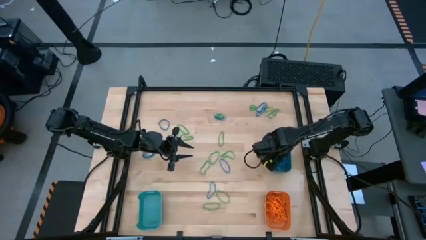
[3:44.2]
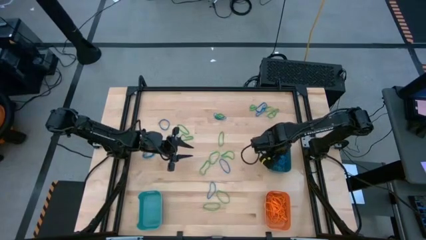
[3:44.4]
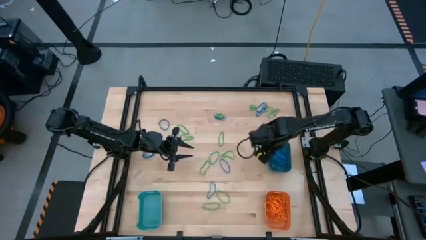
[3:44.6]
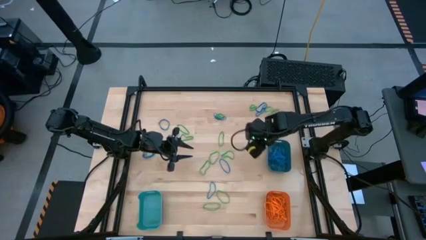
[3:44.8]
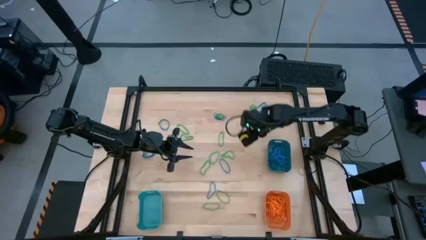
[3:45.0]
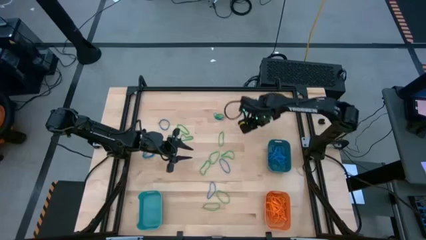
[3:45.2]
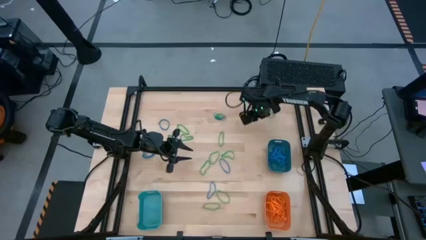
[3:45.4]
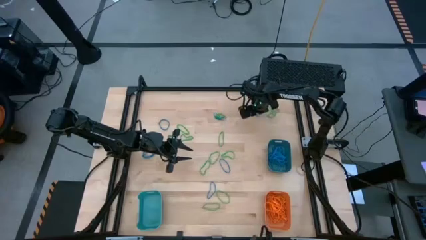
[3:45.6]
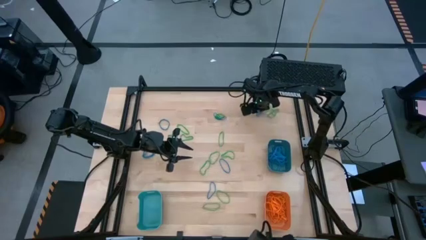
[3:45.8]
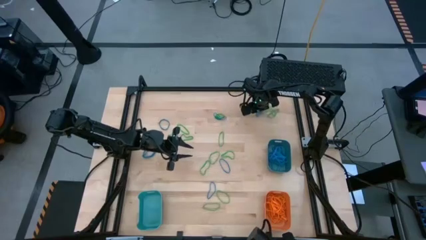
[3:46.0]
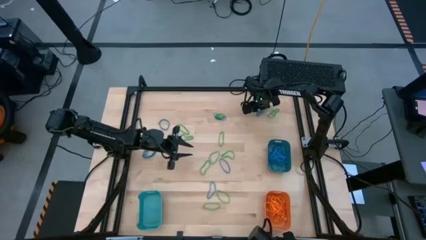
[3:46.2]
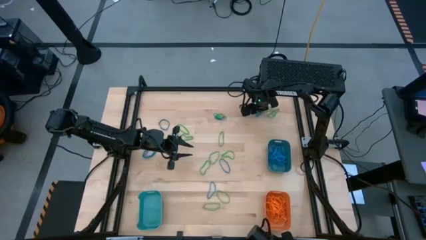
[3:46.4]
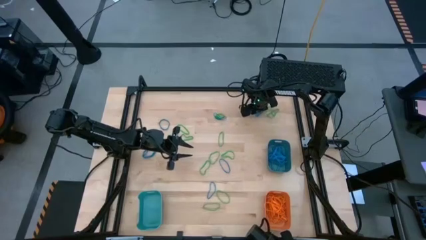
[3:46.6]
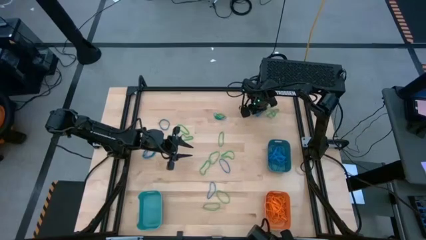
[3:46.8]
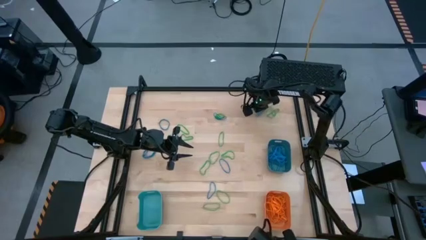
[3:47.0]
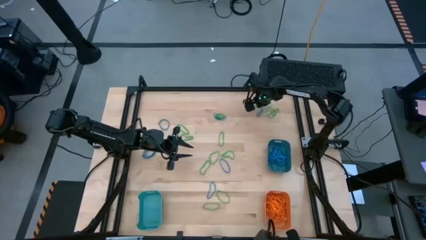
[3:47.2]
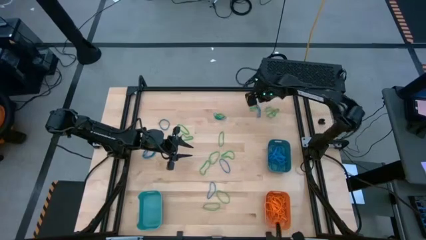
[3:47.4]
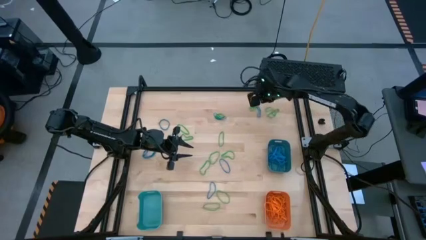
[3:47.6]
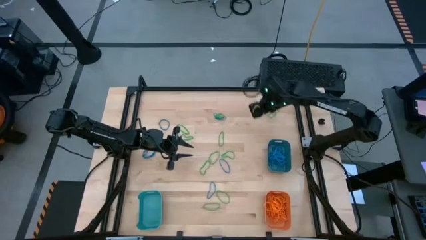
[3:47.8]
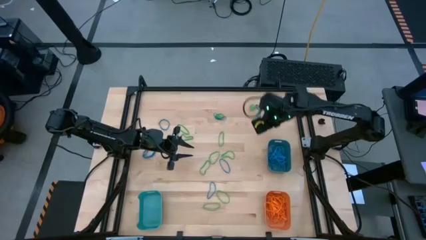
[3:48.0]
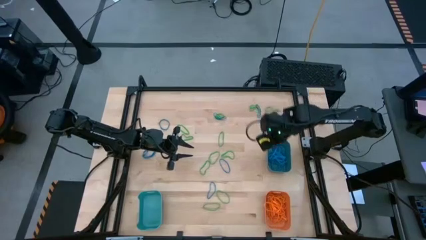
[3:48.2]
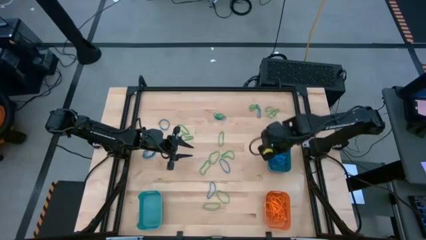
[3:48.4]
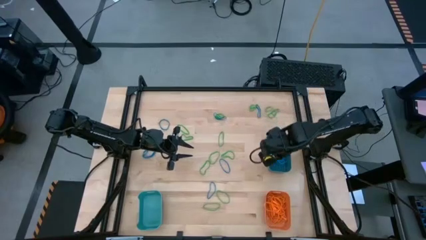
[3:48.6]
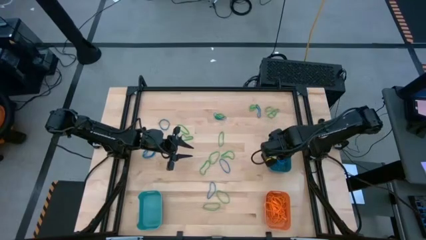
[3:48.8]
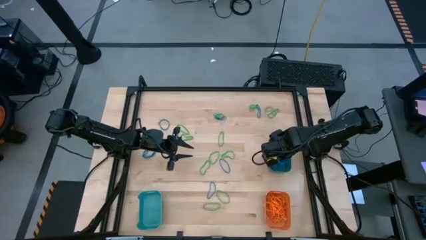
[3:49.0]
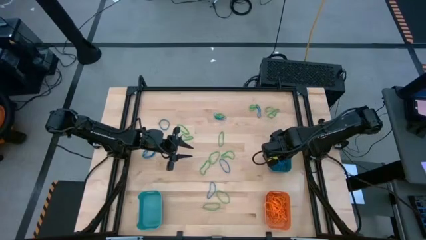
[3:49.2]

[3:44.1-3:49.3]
Task: Sort rubber bands into baskets
Put the blue rubber band into the dark blue bin

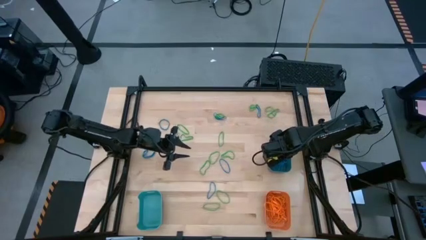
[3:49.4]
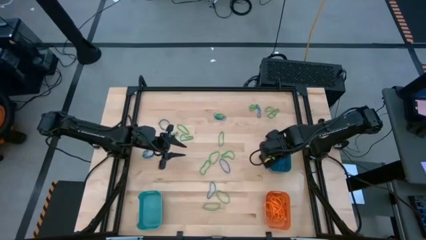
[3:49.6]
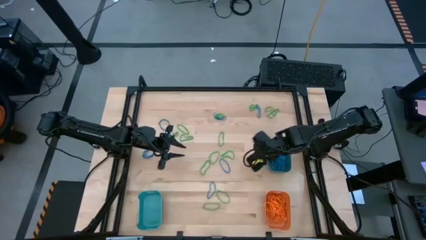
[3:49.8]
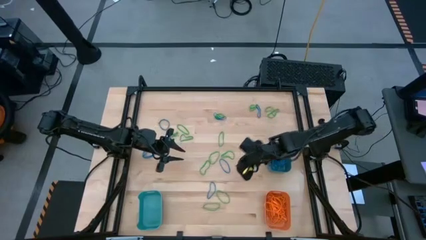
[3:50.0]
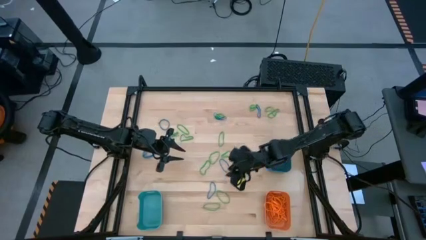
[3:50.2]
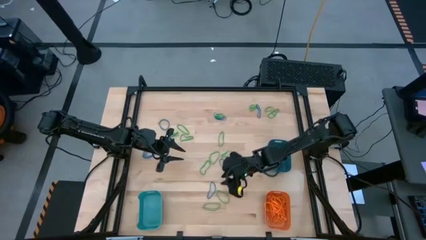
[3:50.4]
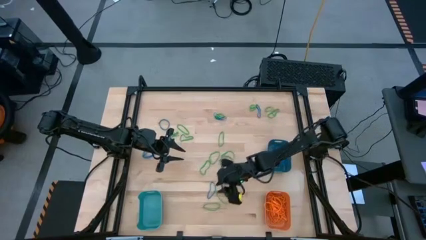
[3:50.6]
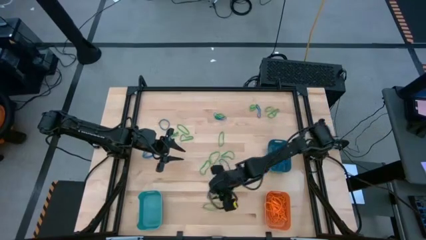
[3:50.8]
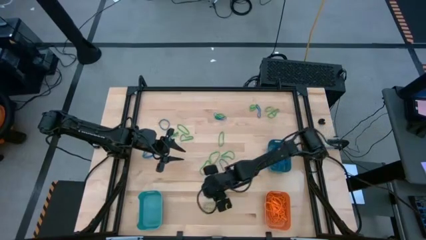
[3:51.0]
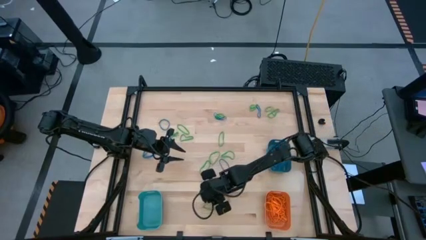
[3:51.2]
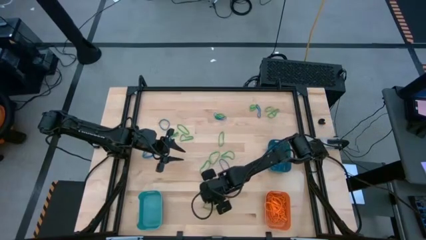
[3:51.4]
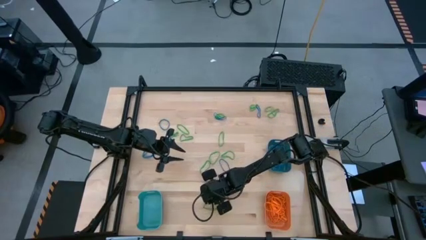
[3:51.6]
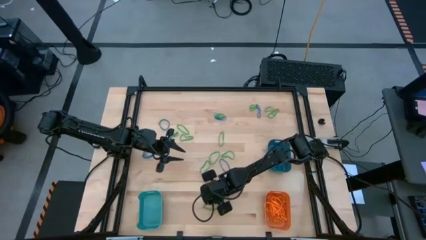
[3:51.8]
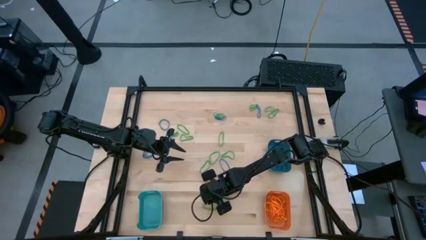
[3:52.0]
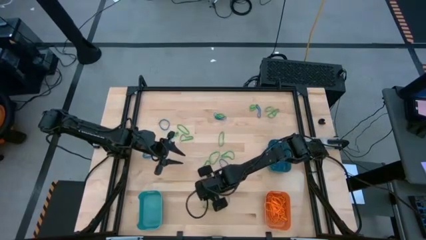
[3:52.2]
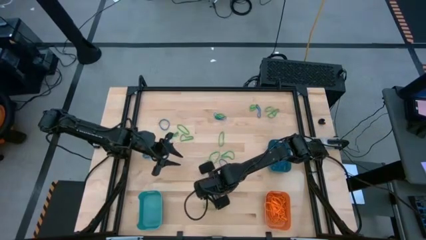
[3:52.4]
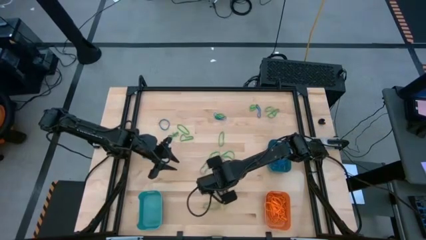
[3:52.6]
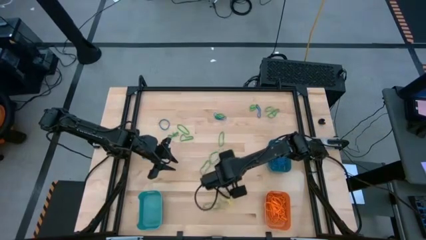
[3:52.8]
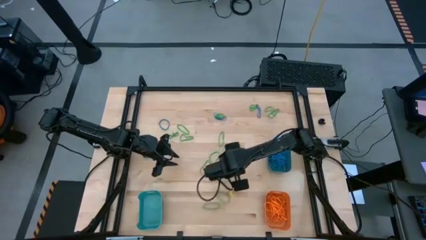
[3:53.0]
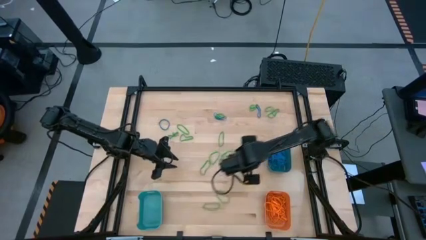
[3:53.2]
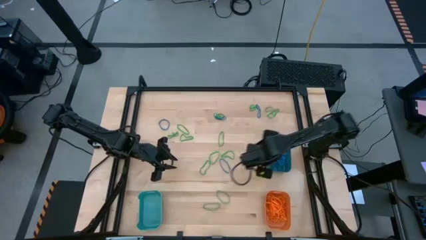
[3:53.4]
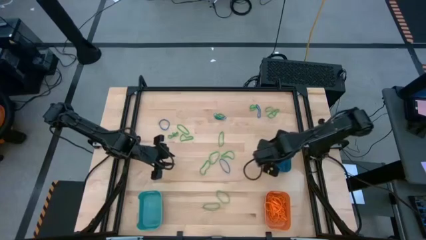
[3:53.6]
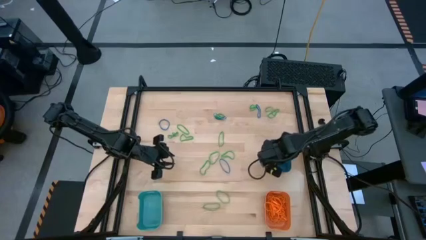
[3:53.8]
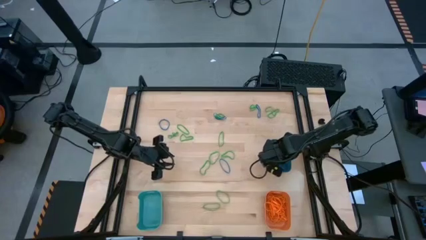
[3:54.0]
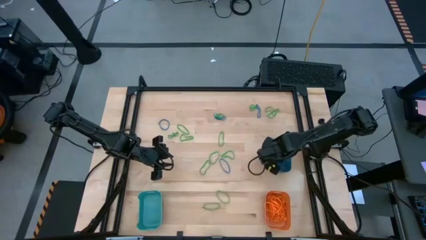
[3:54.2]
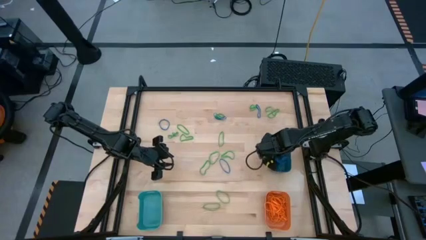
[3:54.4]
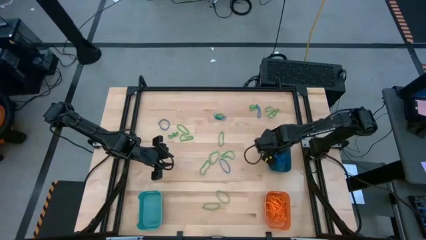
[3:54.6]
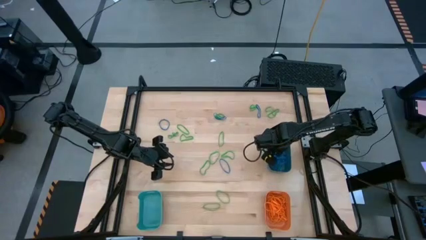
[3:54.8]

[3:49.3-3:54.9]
Put the blue rubber band into the dark blue bin

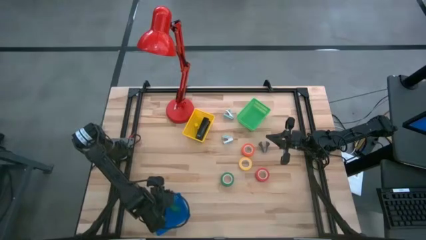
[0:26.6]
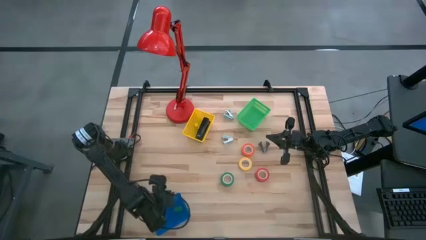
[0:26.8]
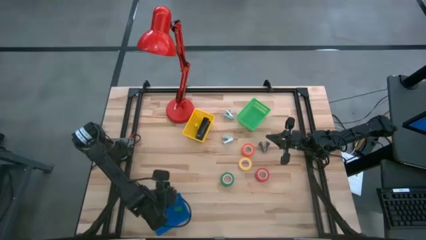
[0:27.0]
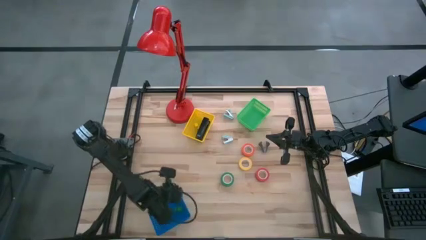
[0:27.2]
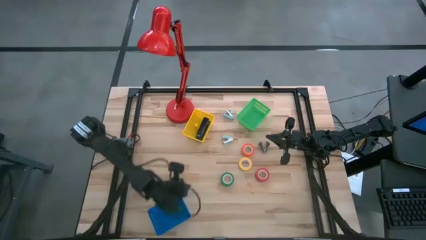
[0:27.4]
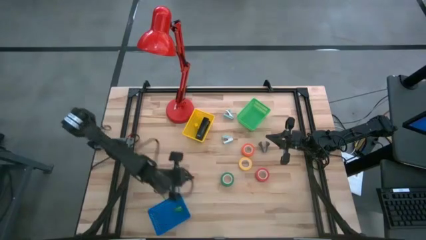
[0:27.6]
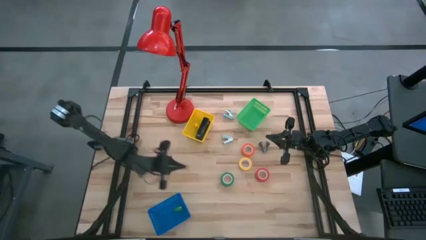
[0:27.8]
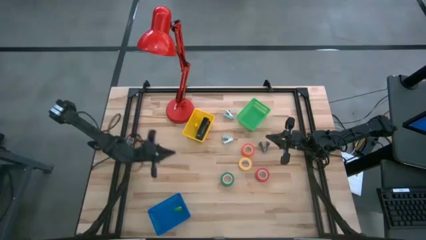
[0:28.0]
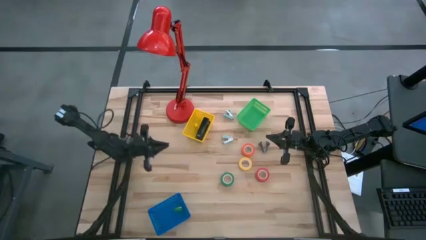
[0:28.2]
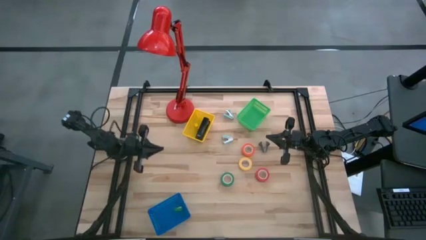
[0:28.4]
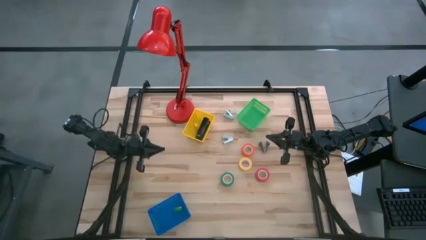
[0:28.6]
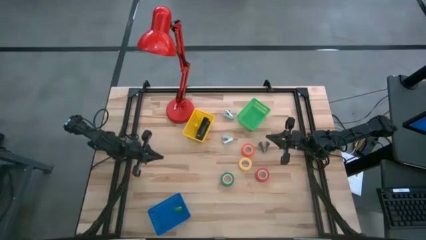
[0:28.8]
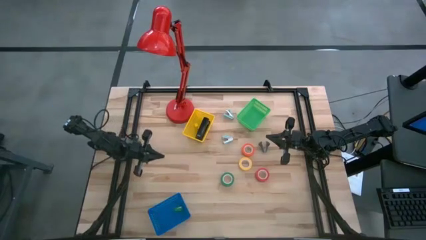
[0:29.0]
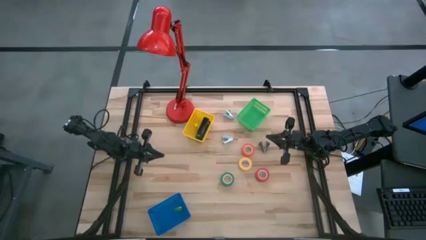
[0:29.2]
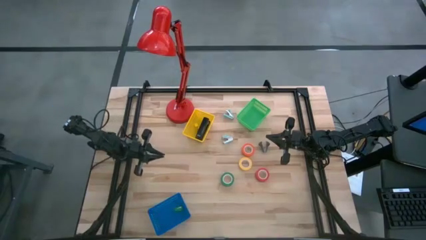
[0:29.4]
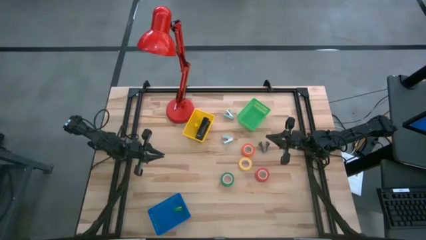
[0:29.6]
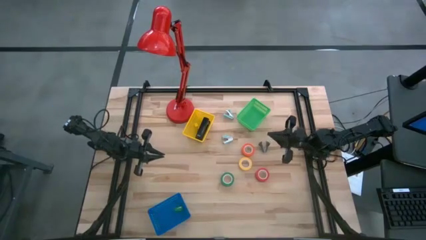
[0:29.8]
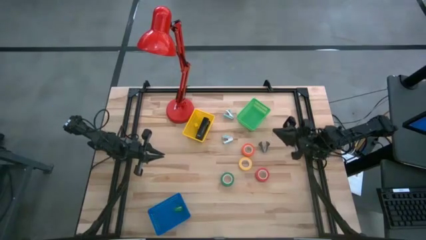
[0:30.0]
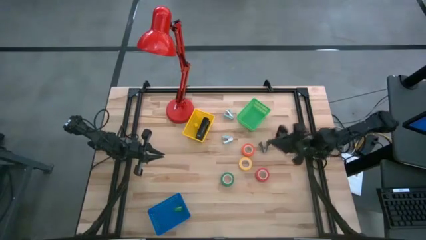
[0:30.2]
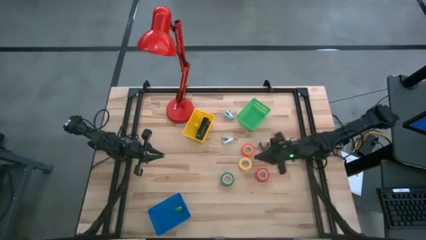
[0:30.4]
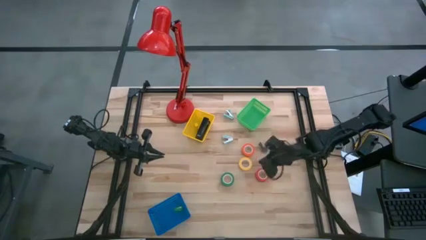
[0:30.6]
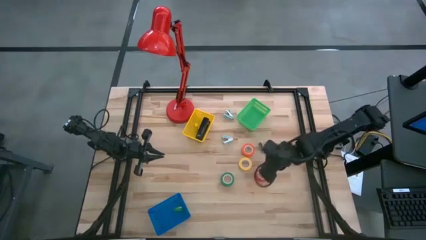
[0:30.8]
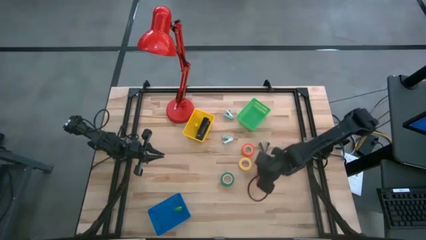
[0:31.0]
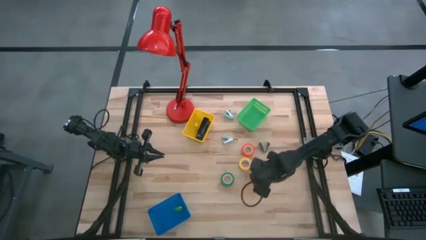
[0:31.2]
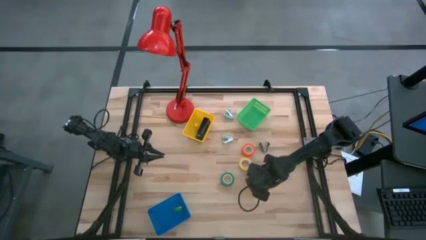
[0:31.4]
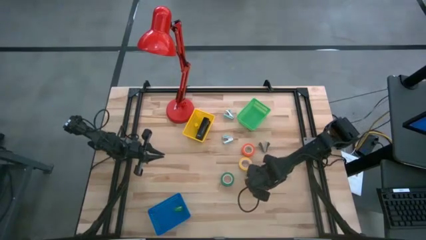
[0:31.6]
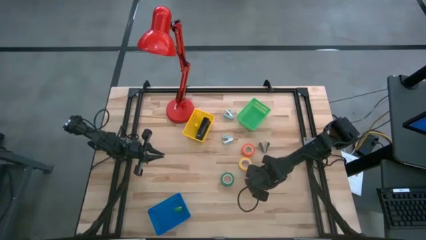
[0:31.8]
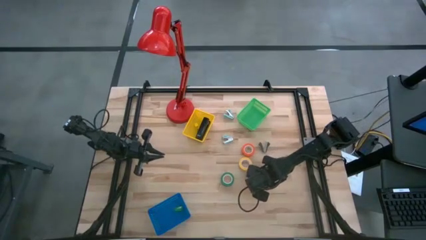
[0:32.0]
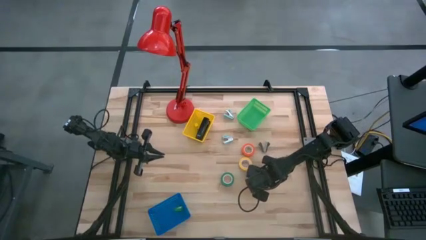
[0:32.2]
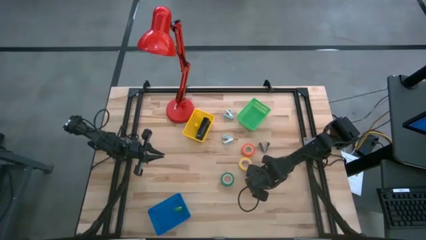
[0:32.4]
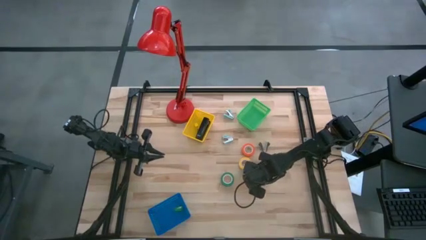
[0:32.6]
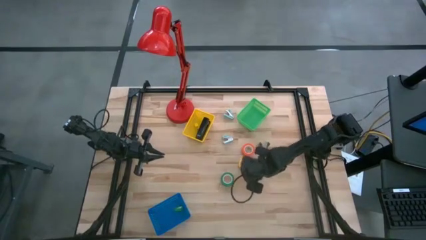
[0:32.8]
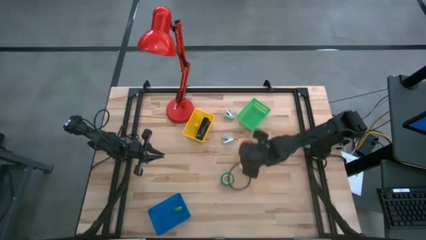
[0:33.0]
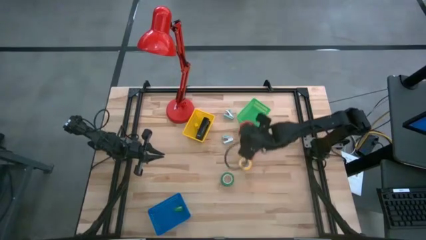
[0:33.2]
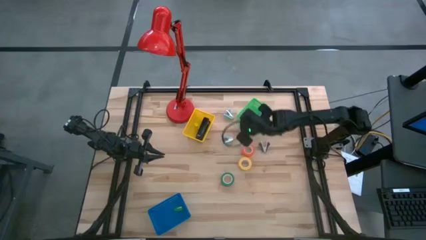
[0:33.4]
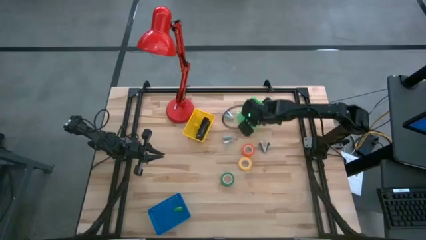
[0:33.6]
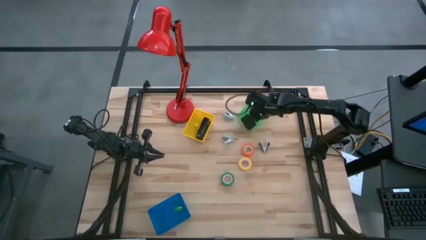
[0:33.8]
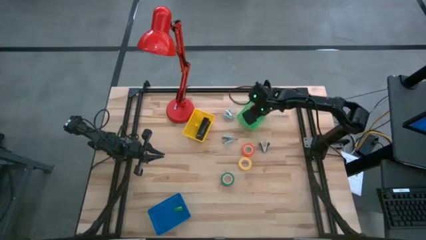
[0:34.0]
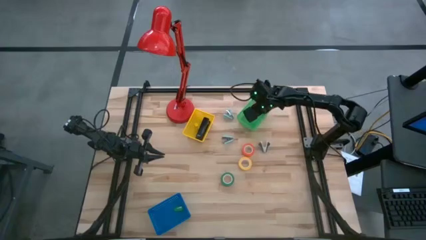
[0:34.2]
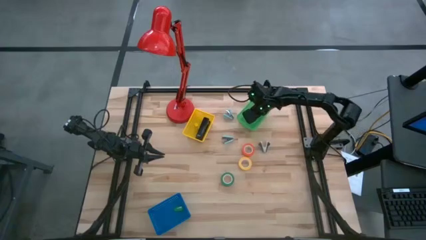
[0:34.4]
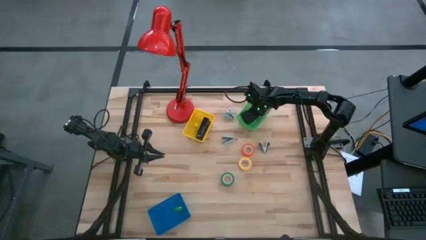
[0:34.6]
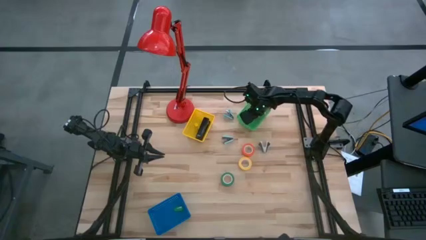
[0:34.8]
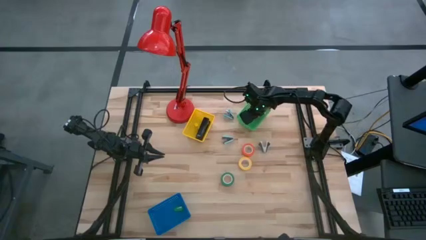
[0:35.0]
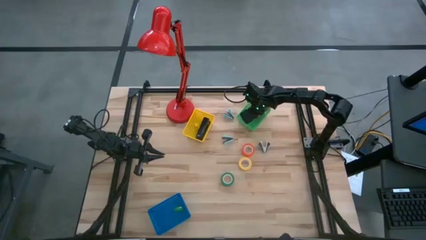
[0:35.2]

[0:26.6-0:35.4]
Task: Pick and place Stapler, Stapler remover, tape
Put the red tape into the green bin
